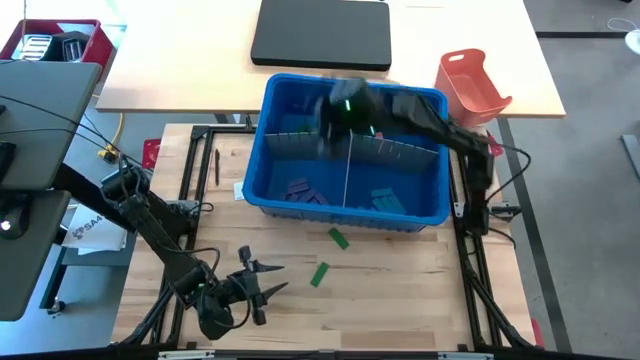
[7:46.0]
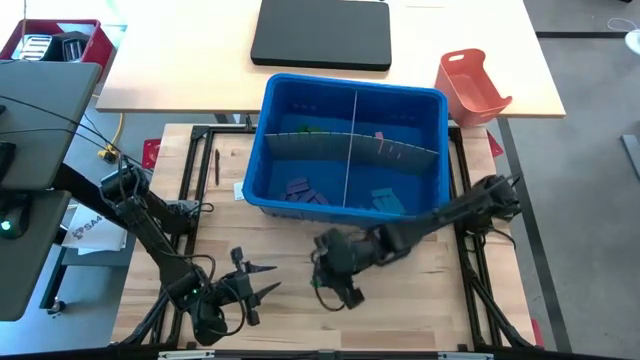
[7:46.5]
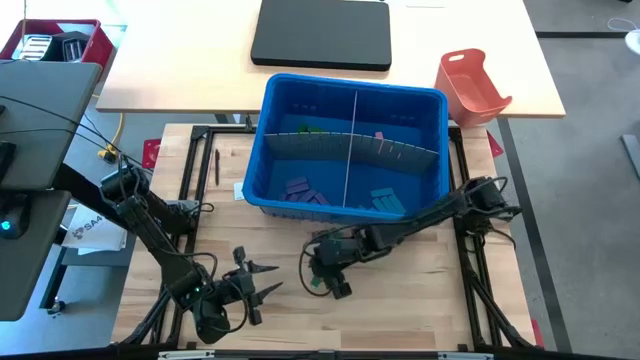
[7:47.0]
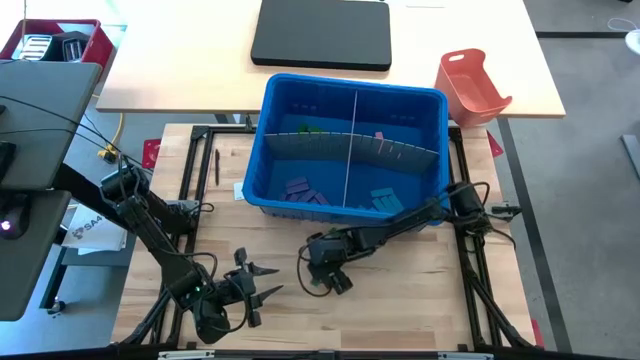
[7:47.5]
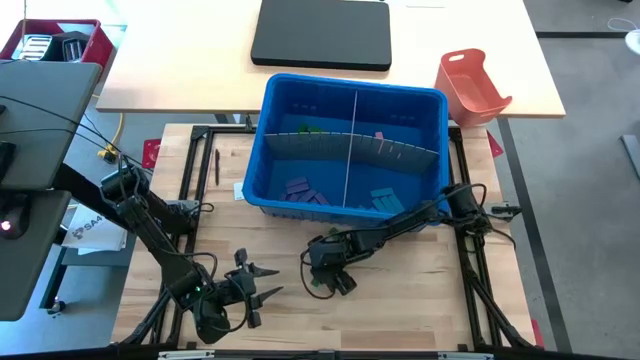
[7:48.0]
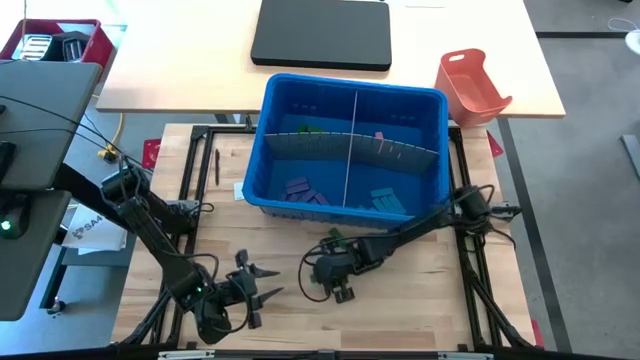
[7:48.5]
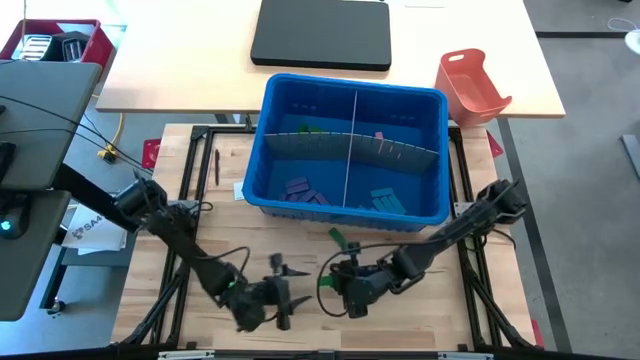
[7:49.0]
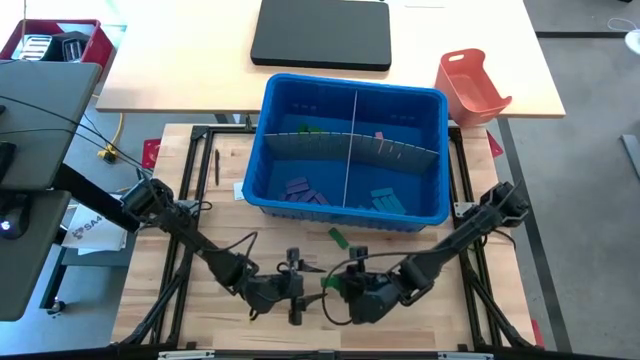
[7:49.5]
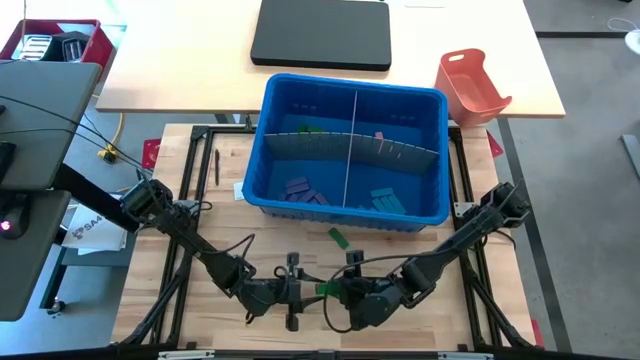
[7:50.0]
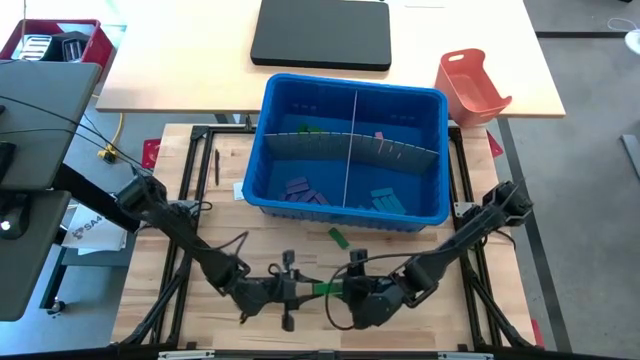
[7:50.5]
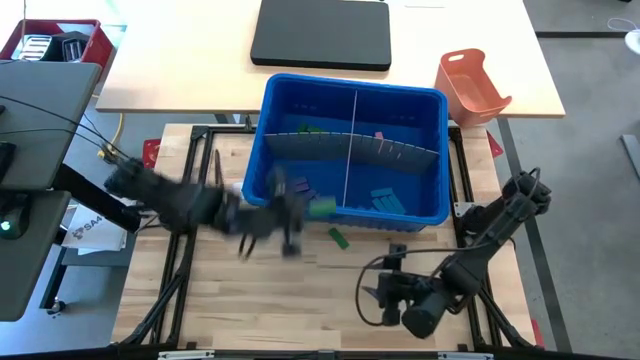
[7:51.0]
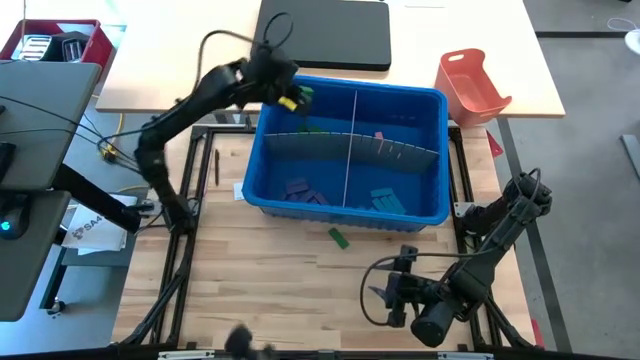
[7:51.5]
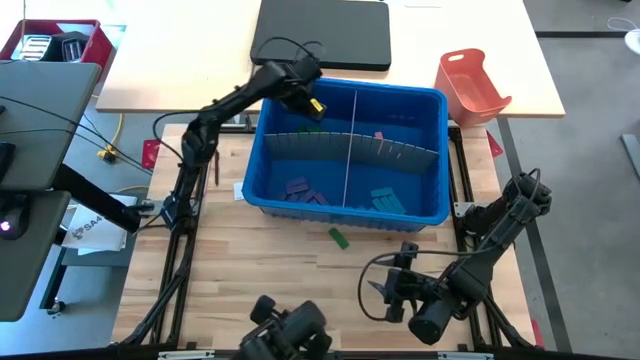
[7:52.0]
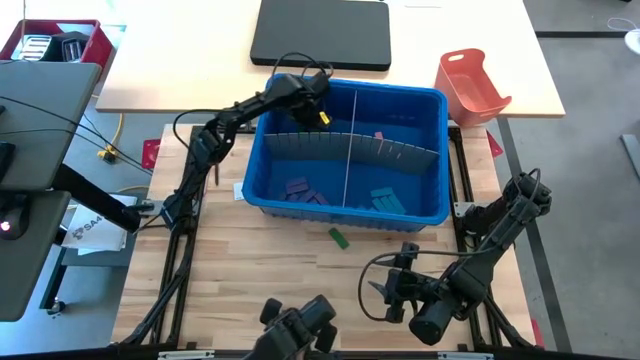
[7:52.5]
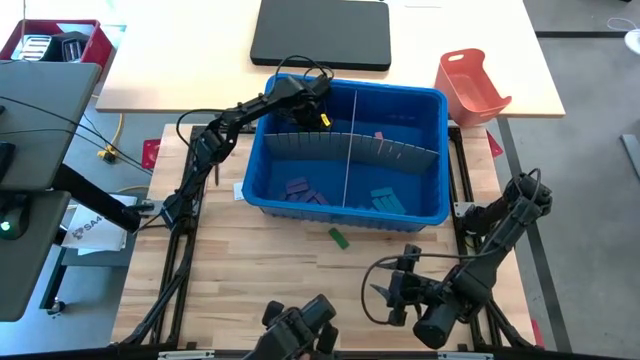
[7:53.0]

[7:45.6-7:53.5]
Task: Sort blocks
Put the green block into the blue bin with the other green block

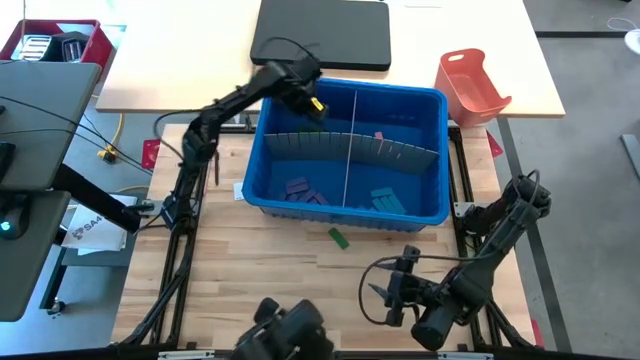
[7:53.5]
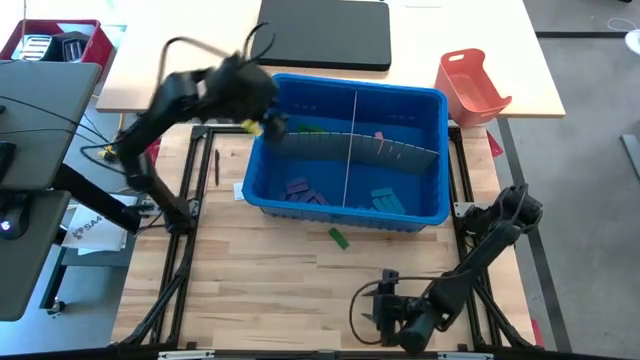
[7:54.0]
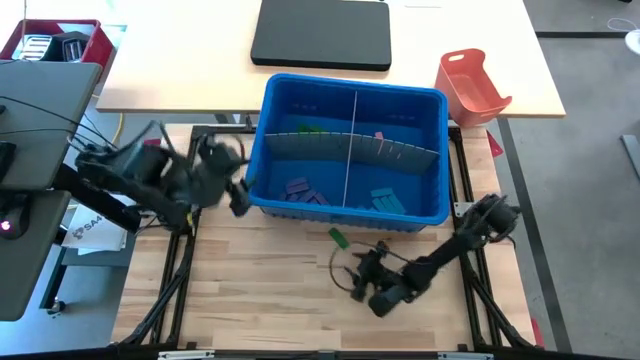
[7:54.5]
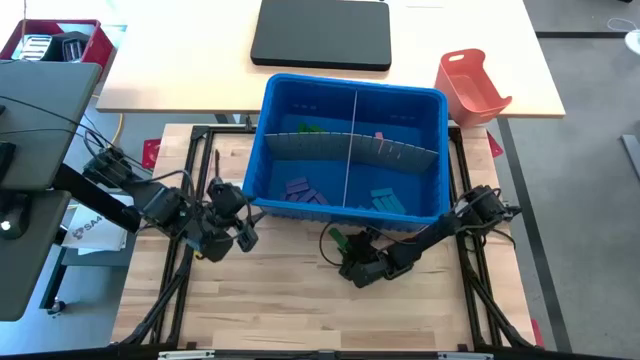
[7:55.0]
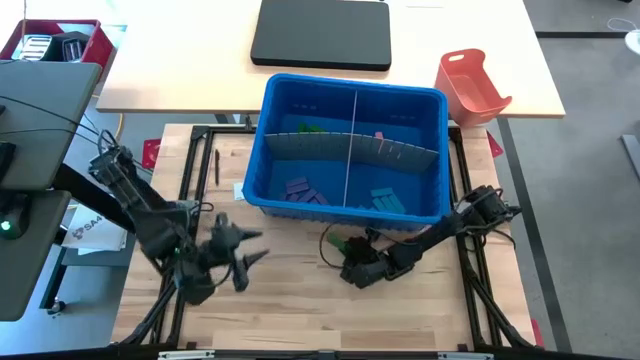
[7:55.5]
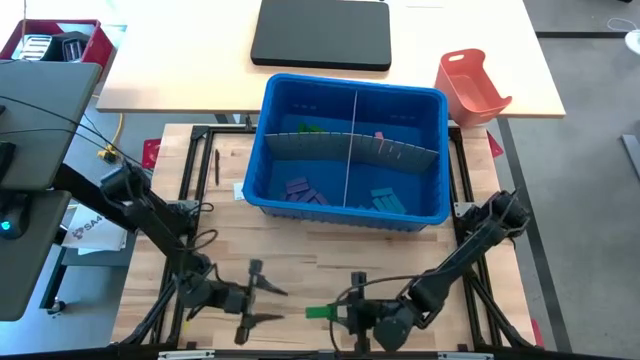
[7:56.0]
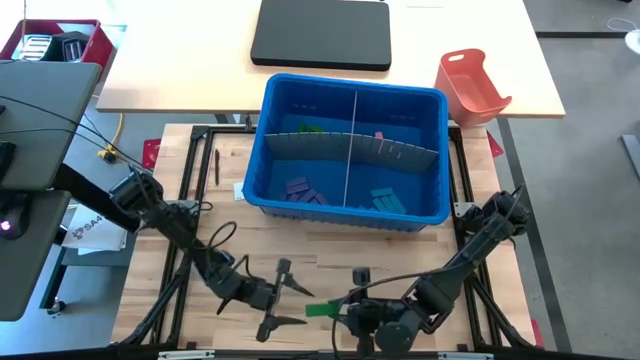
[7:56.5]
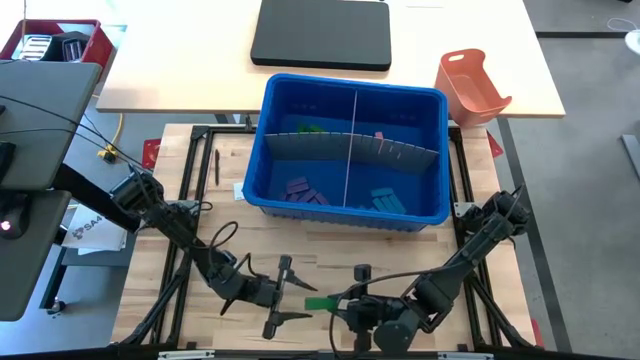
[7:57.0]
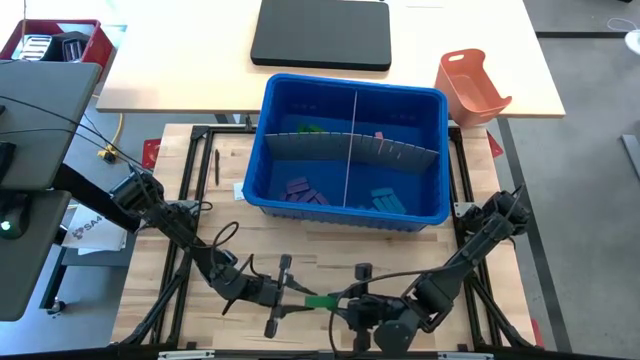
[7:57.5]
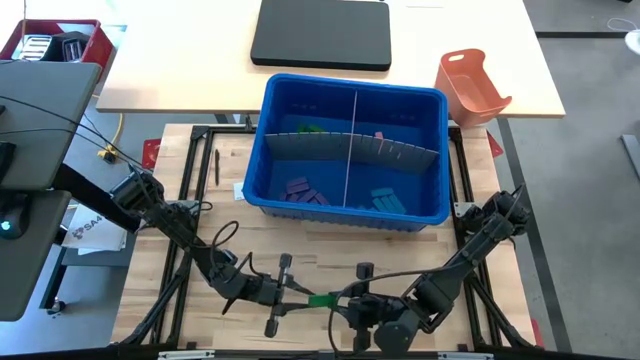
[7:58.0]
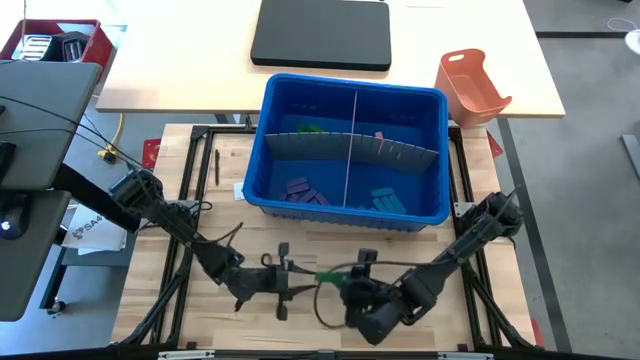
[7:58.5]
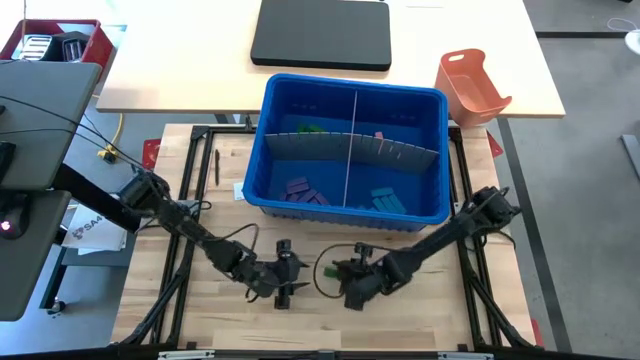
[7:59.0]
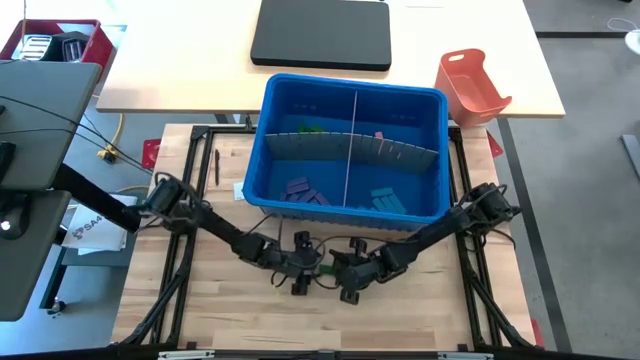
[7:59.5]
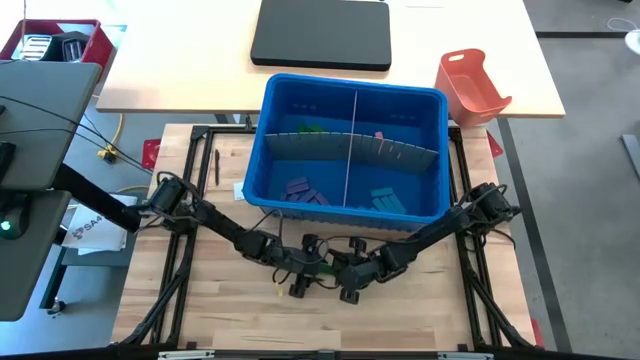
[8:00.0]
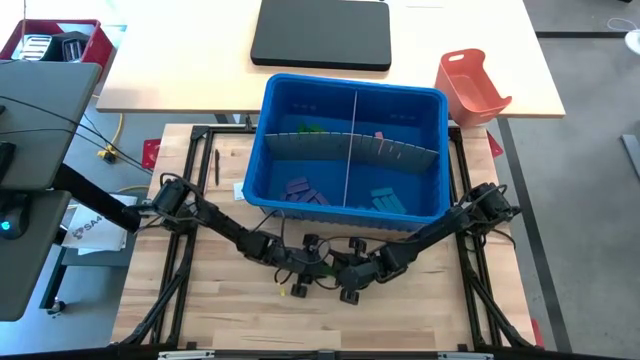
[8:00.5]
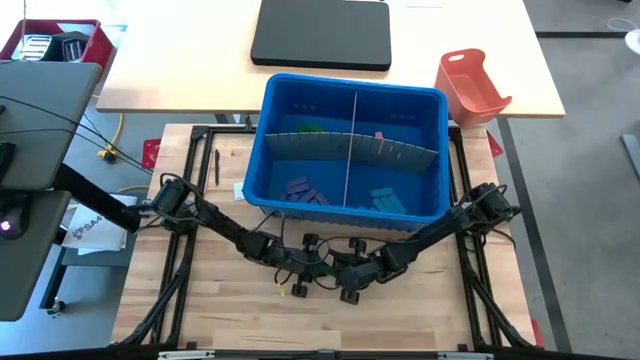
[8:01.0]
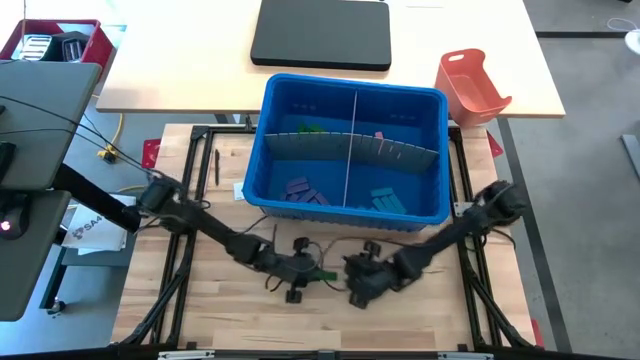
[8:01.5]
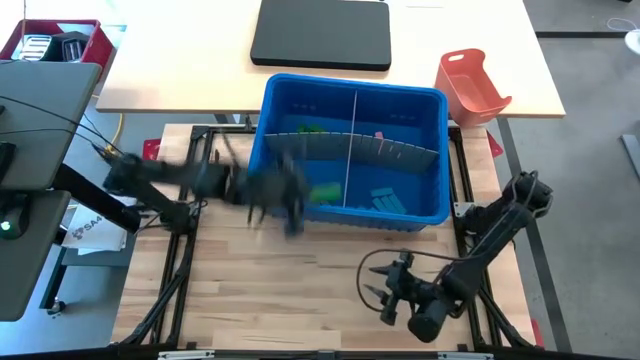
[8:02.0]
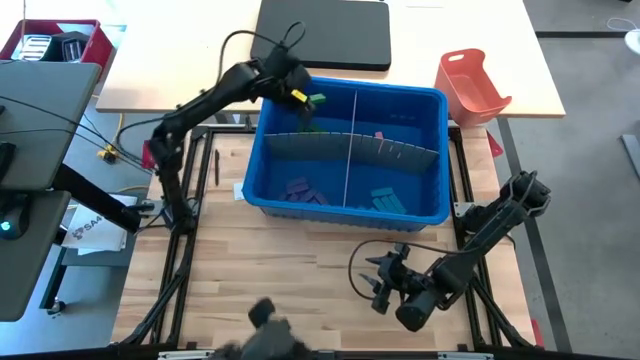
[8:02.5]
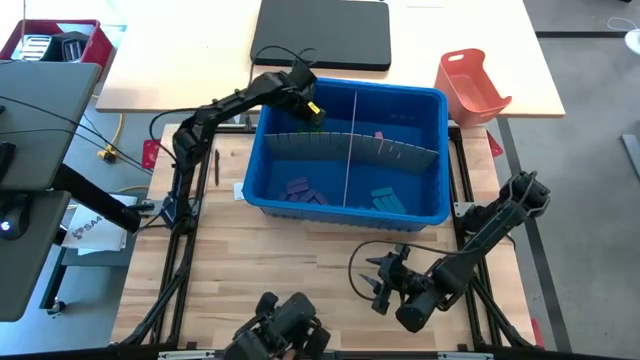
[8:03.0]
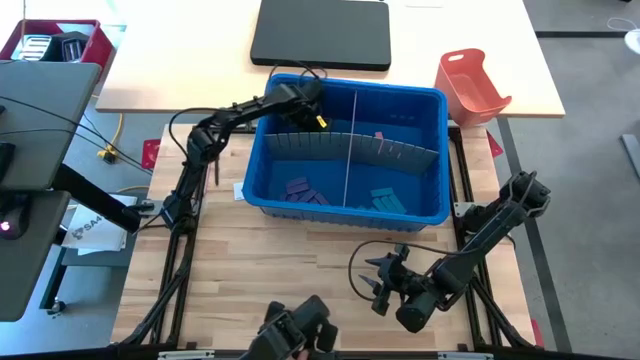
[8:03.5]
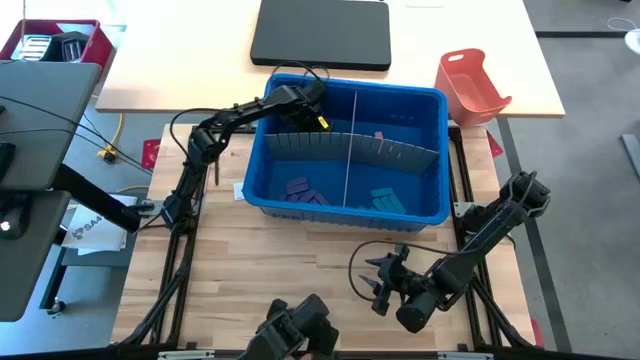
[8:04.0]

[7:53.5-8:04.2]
Put the green block into the blue bin with the other green block

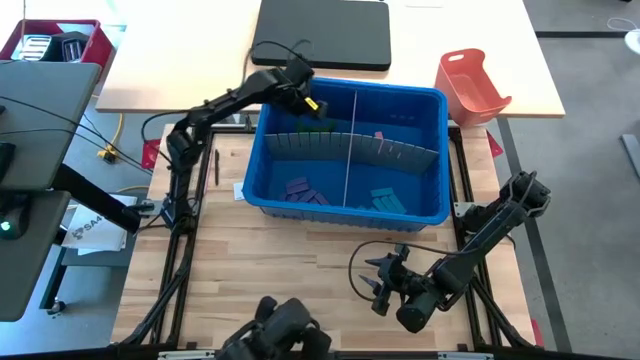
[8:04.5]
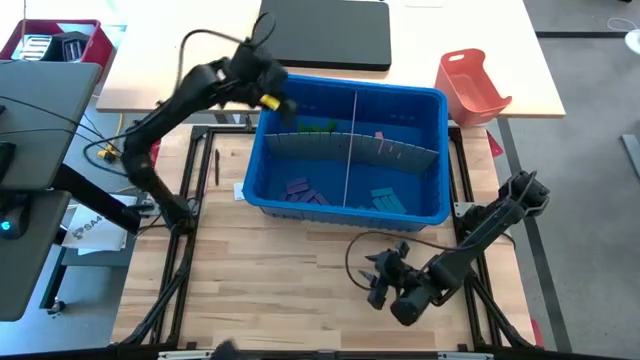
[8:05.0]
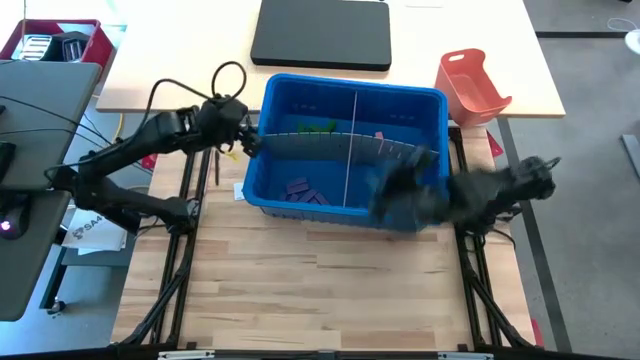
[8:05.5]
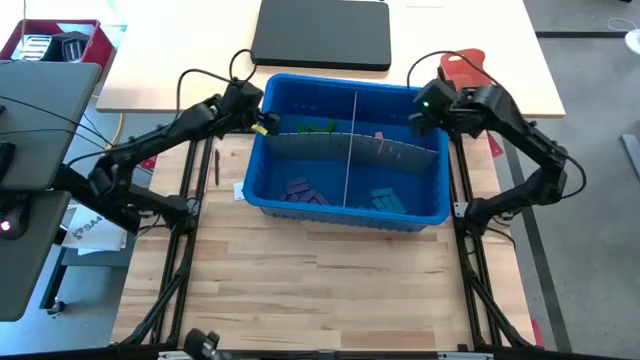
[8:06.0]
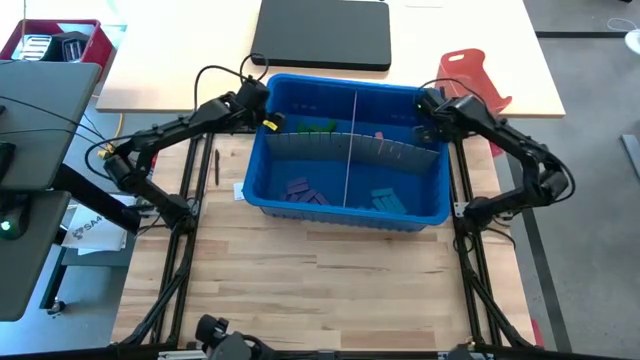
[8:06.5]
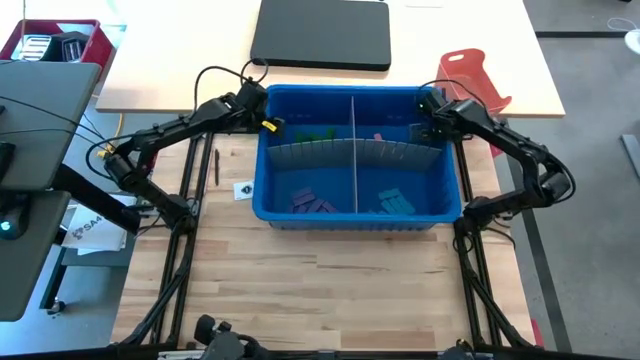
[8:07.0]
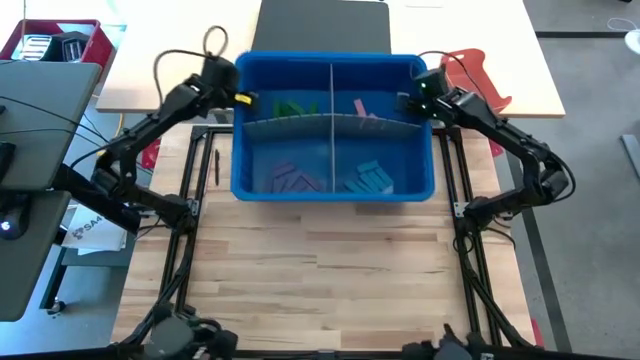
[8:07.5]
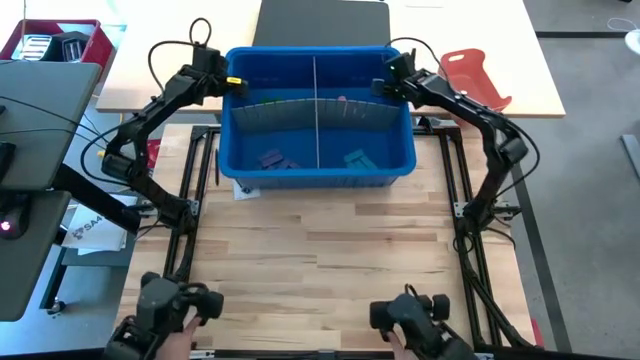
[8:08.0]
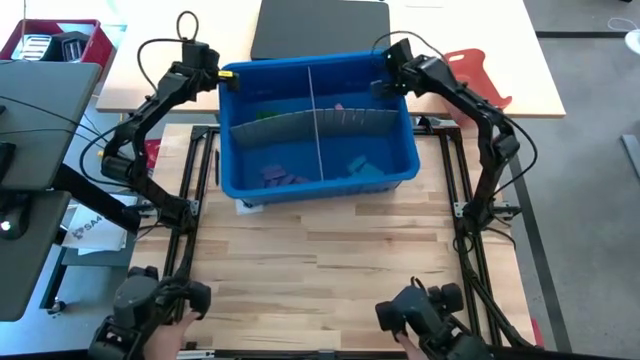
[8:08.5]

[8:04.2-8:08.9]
Adjust the blue bin
